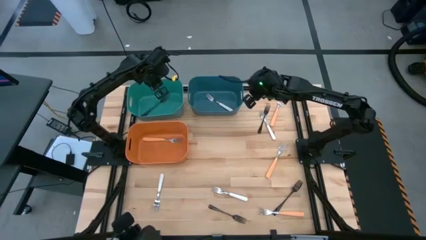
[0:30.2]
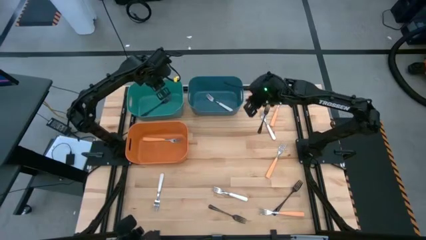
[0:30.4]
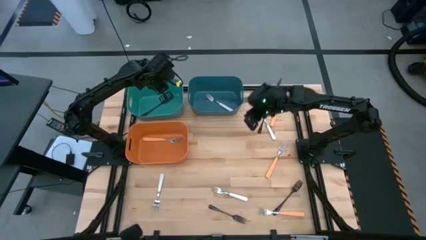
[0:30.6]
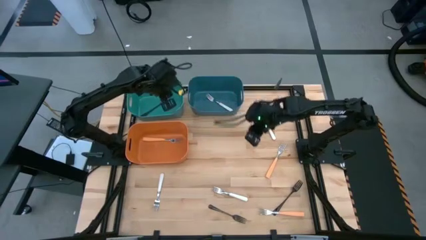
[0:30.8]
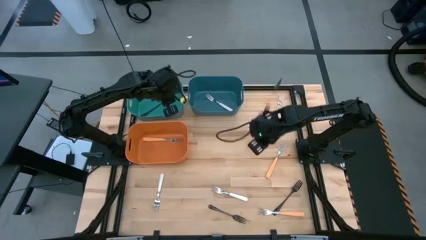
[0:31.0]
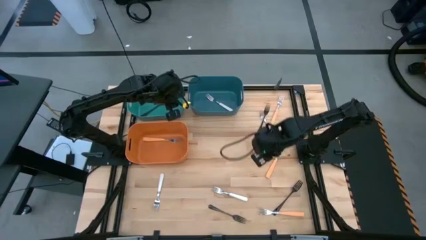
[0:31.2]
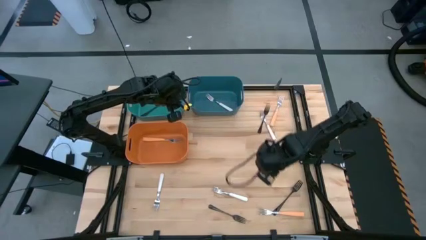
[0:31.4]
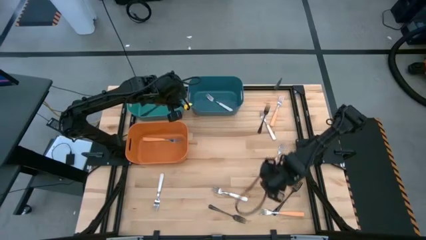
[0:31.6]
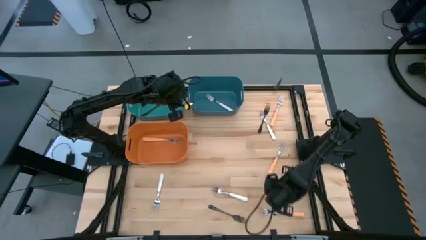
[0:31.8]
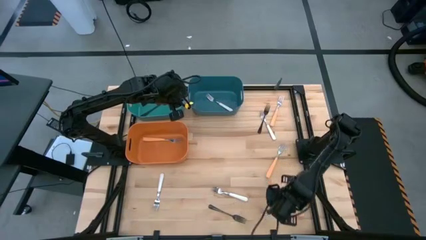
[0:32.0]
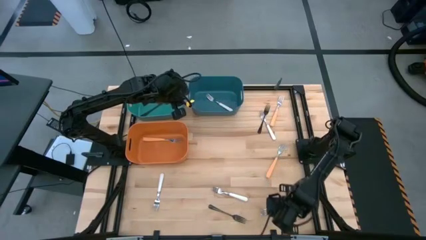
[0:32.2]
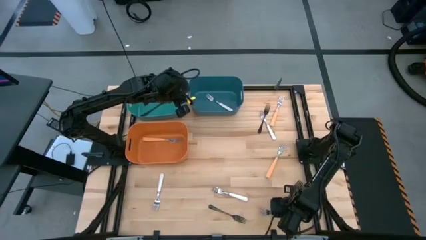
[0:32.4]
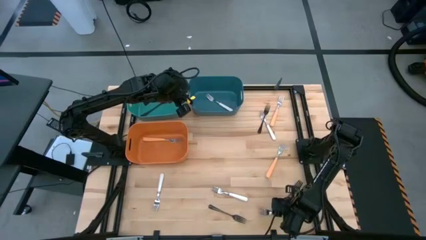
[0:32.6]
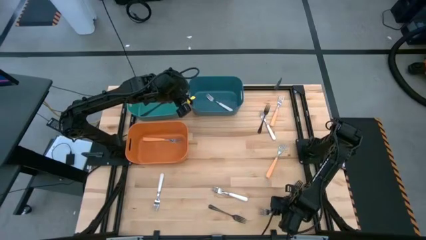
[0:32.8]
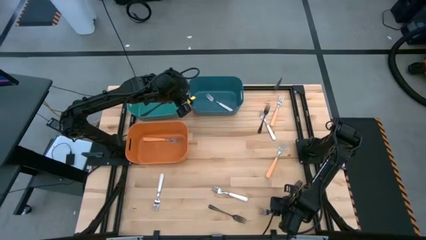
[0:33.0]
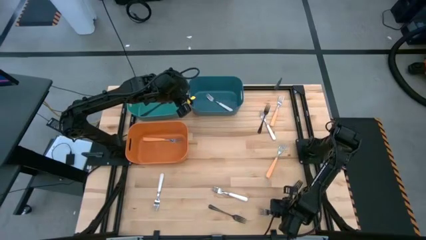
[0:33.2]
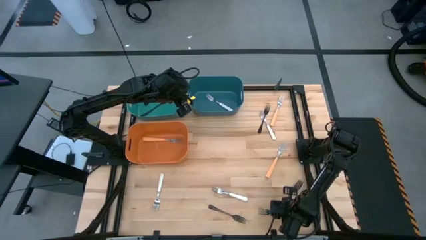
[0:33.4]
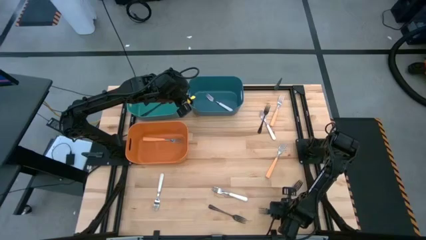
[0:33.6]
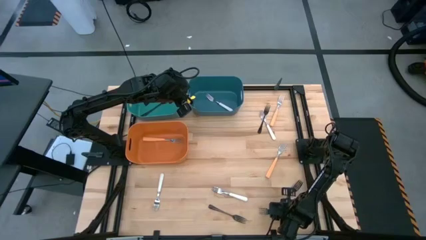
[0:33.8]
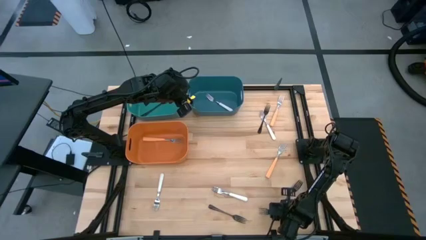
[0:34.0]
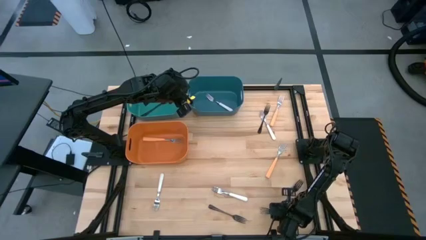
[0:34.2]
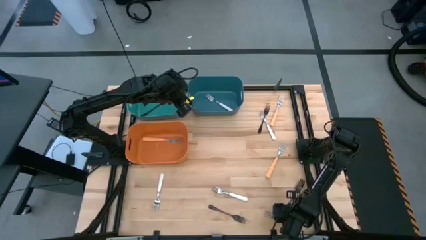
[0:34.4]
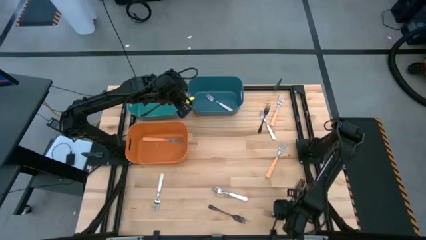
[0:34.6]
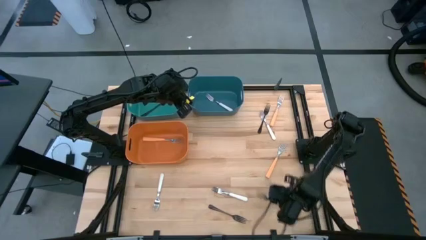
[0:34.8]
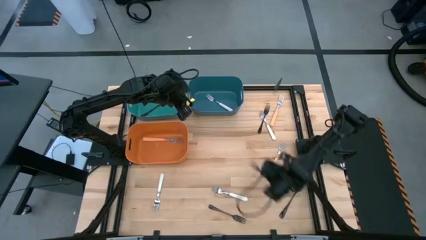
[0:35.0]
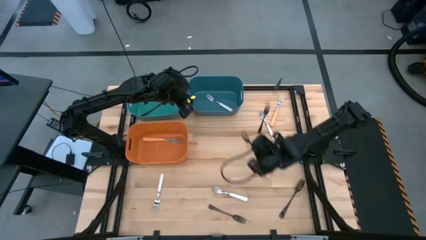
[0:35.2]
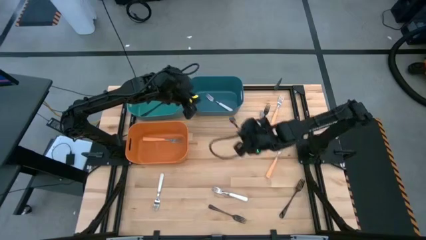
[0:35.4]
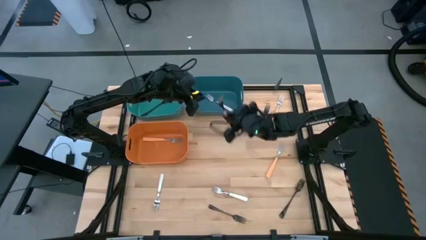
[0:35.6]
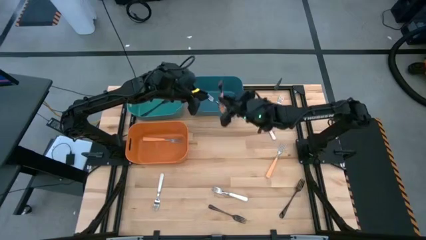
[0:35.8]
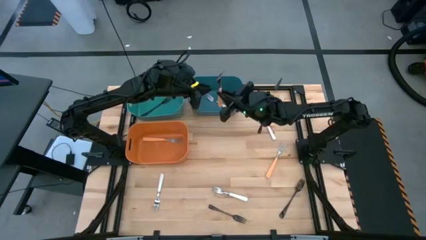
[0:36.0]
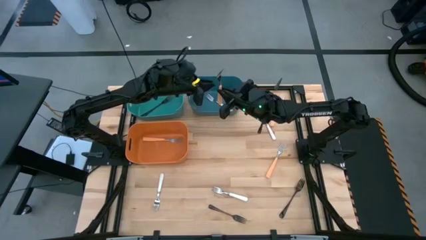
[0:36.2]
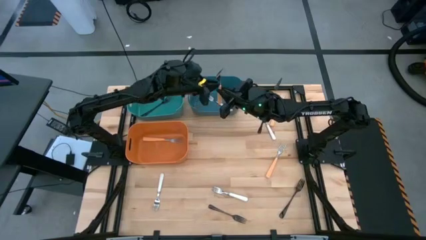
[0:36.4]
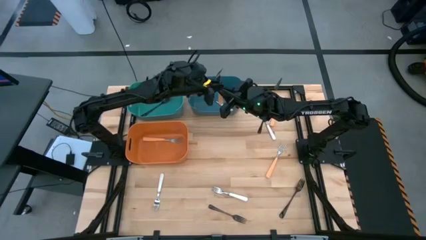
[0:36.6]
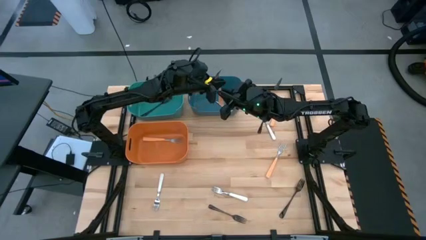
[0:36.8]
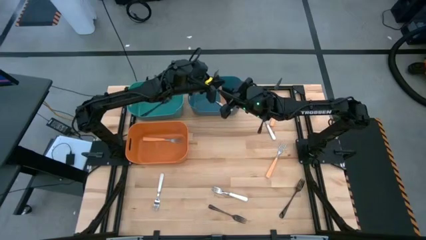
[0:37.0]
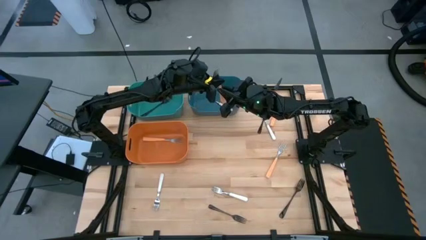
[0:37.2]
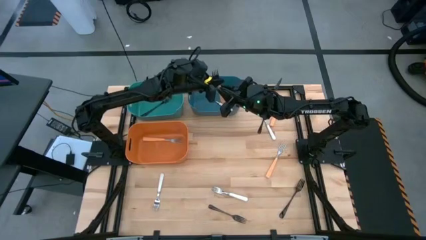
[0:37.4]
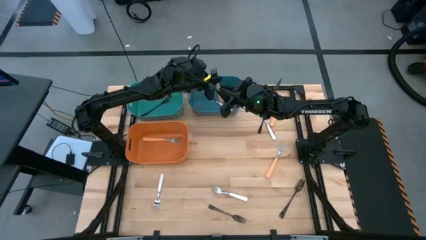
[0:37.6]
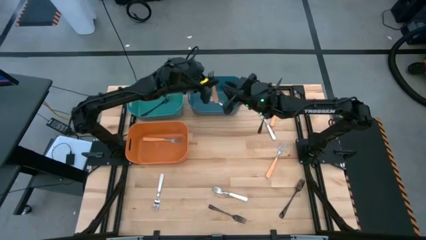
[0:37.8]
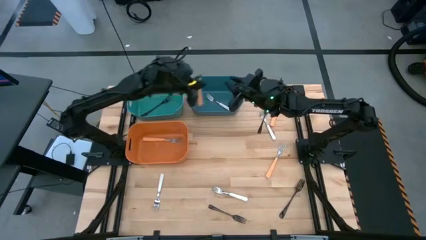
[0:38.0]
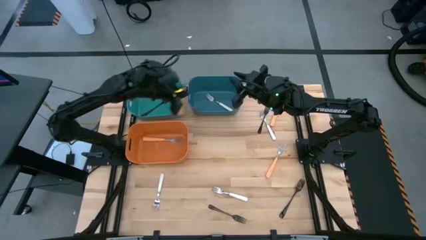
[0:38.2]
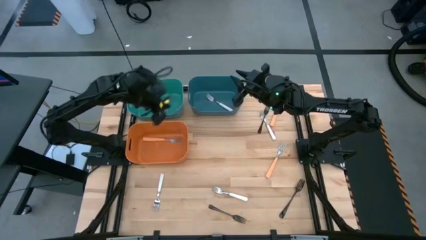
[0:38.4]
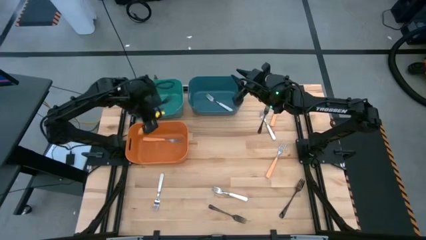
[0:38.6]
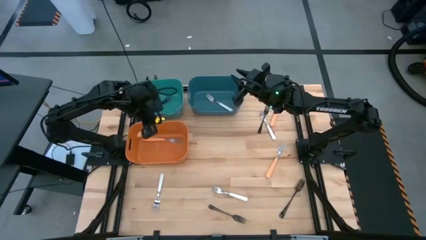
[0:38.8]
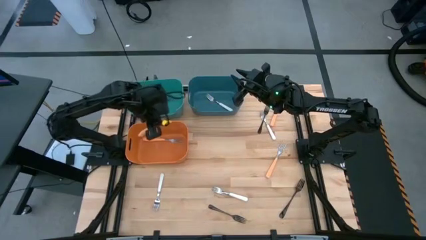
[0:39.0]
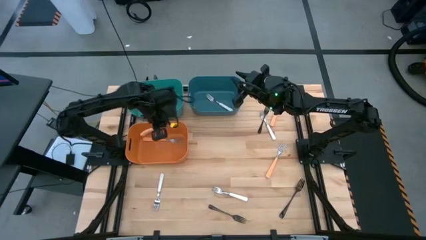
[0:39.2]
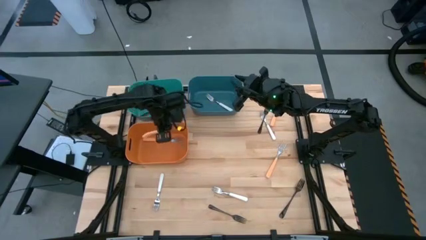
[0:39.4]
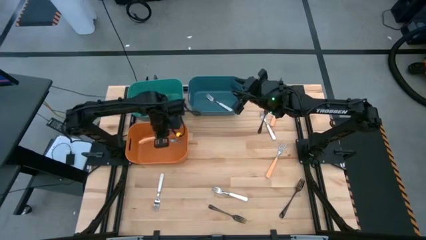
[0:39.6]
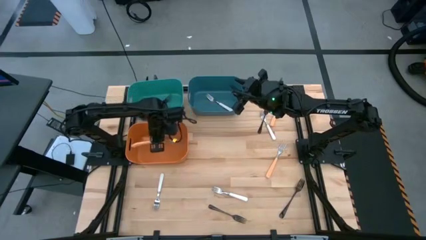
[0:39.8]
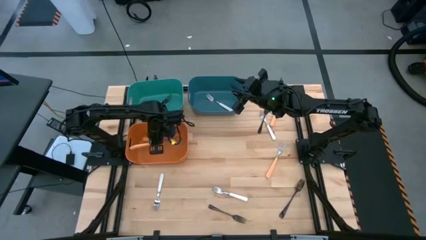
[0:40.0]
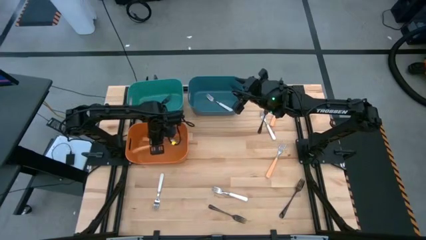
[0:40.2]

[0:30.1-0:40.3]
Task: Sort silverware by color (type)
Put the orange fork into the orange bin

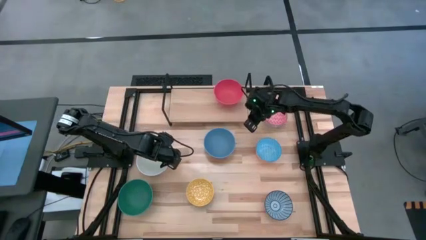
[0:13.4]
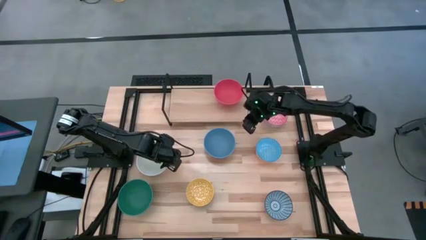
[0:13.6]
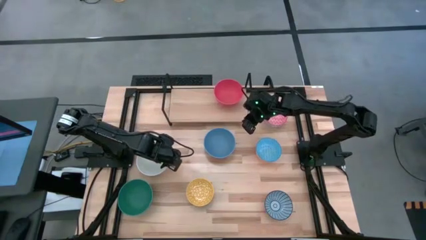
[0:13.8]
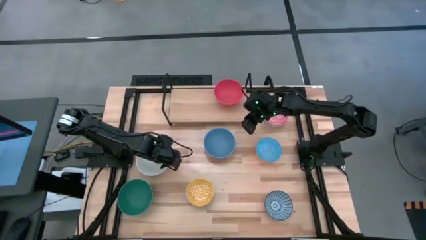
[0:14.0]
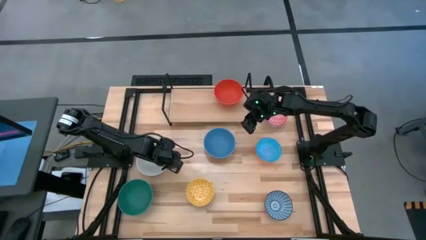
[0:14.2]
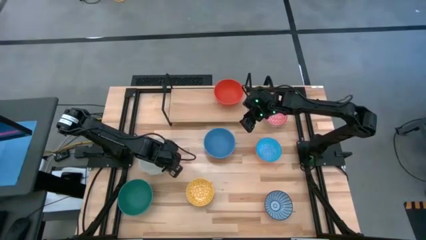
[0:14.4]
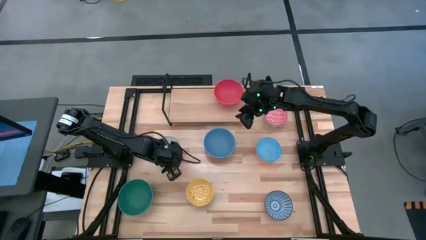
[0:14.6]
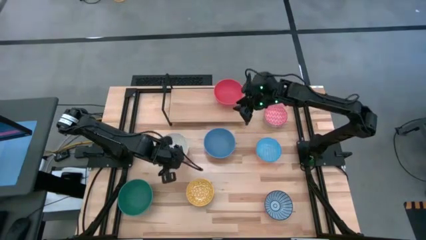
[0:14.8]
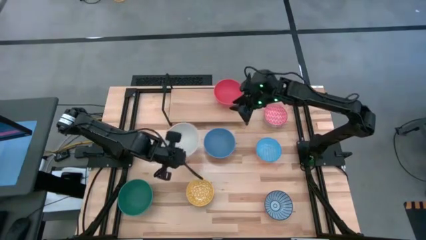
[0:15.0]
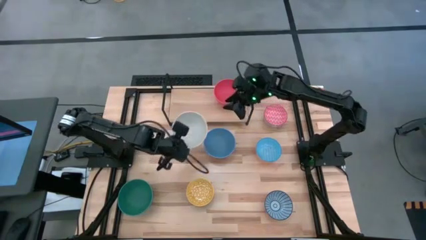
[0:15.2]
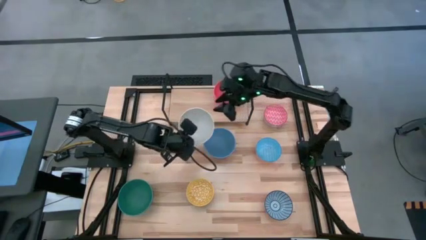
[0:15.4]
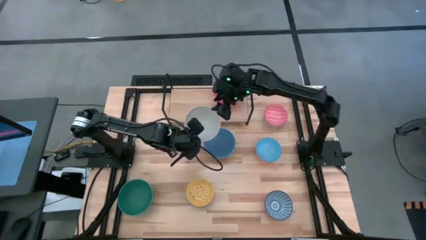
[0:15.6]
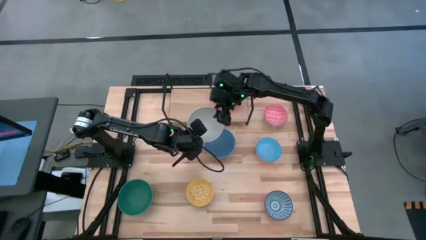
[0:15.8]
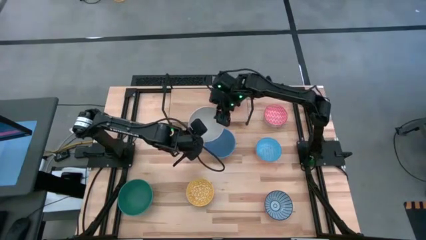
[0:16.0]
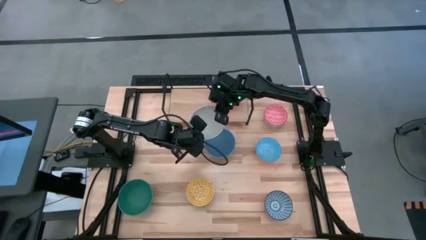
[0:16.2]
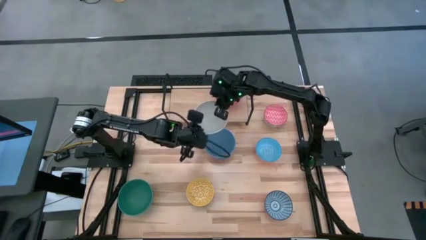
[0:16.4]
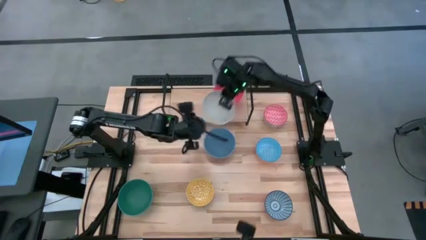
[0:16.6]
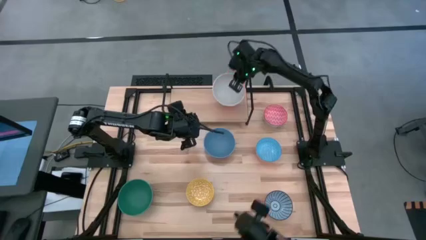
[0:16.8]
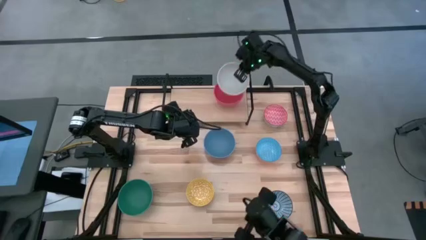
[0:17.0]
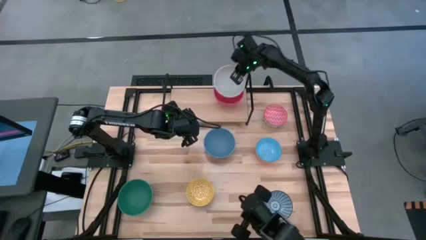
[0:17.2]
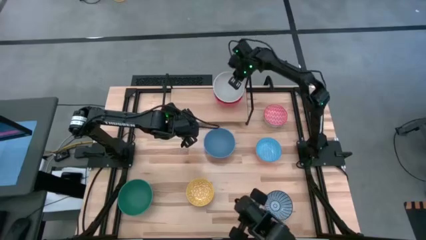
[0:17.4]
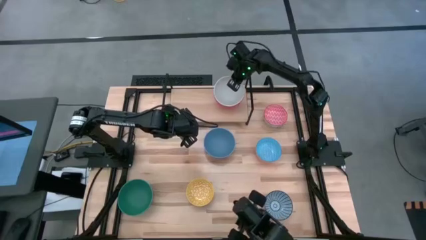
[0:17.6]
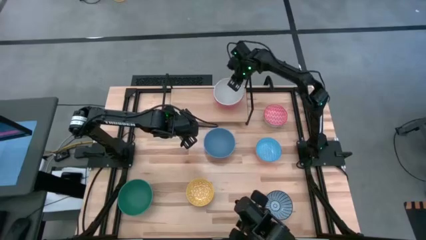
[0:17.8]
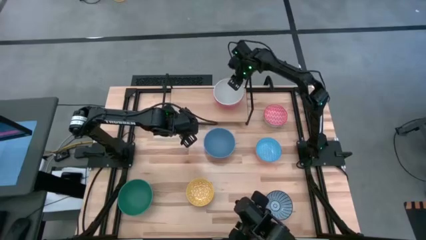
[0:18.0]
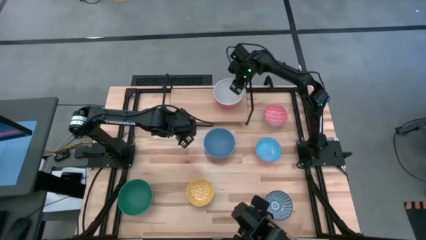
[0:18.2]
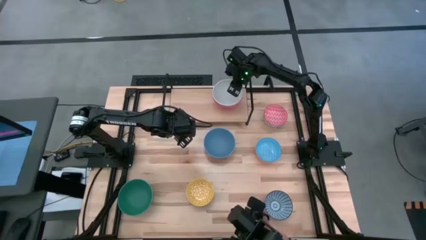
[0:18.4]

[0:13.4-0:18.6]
Task: Place and stack bowls onto a shelf
Stack the gray bowl on top of the red bowl on the shelf
